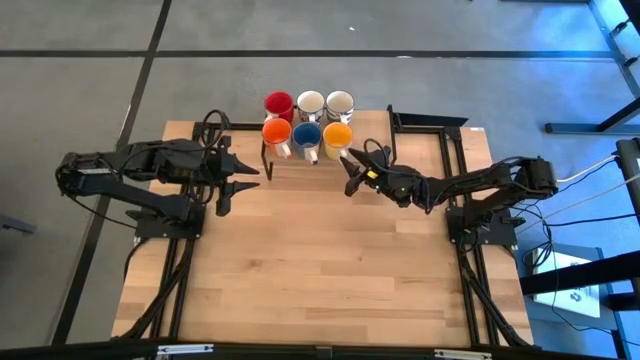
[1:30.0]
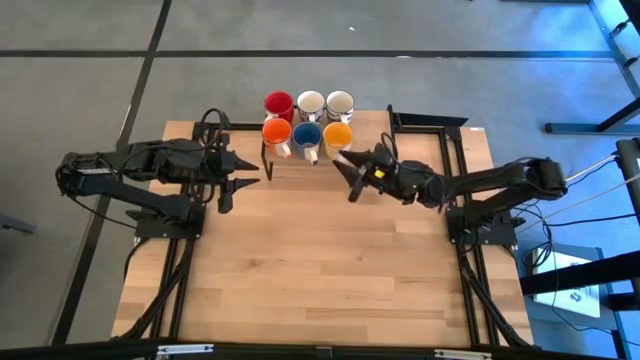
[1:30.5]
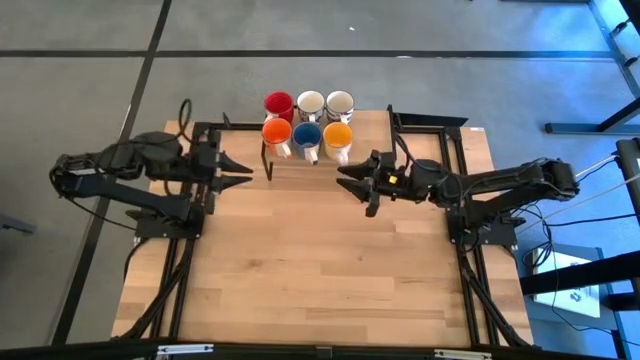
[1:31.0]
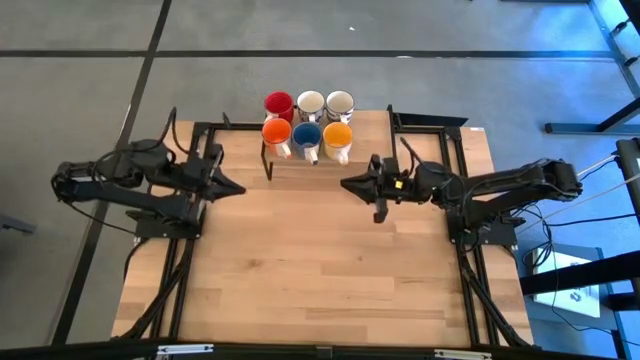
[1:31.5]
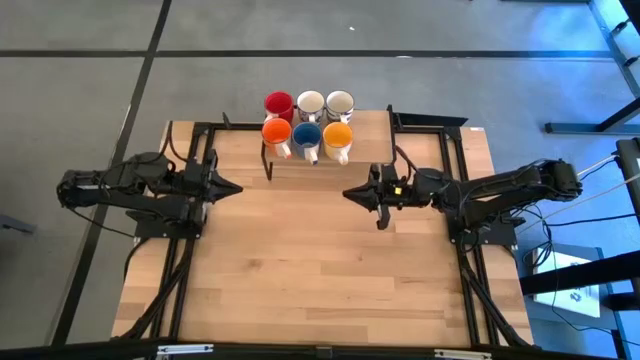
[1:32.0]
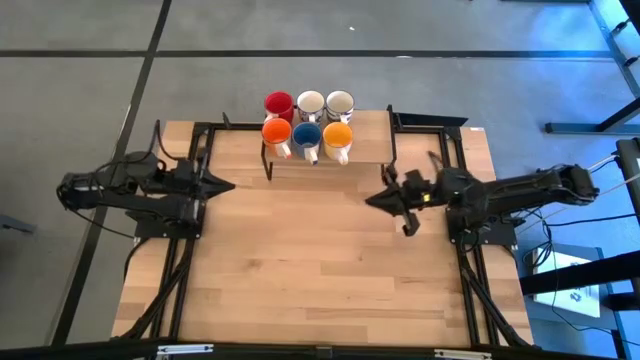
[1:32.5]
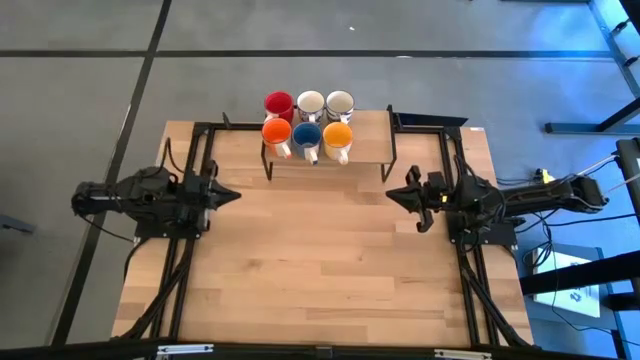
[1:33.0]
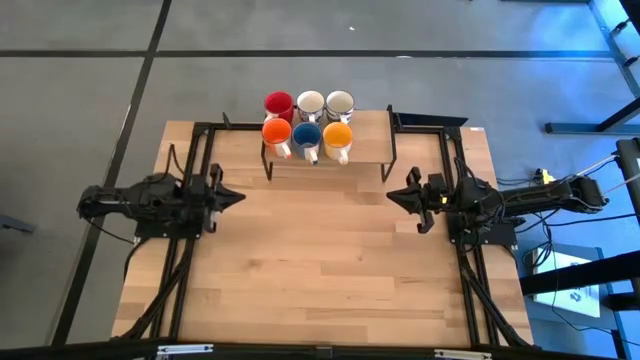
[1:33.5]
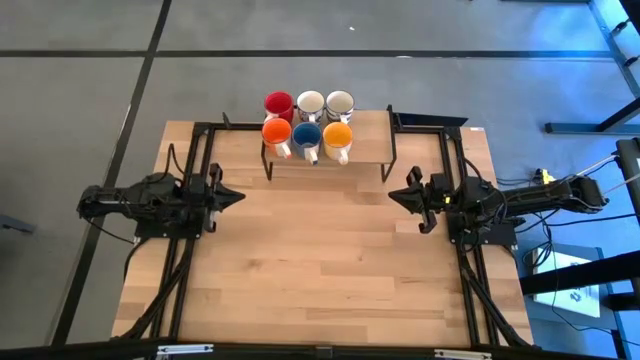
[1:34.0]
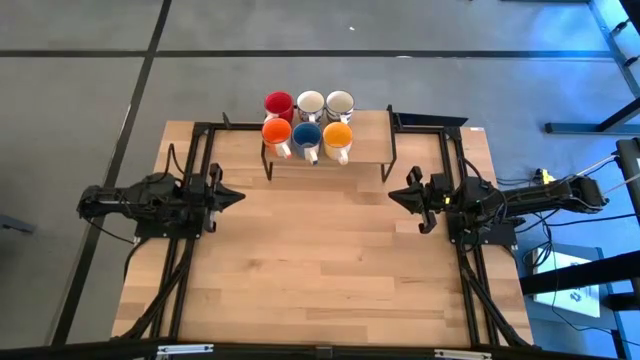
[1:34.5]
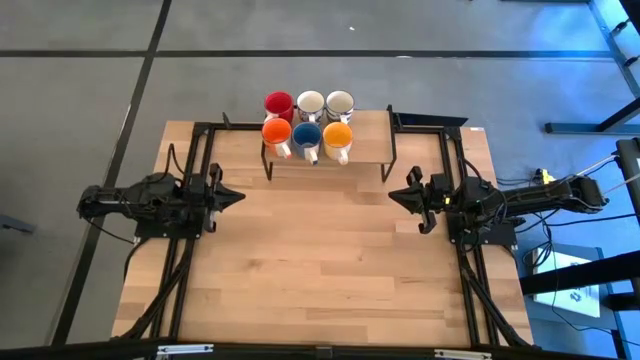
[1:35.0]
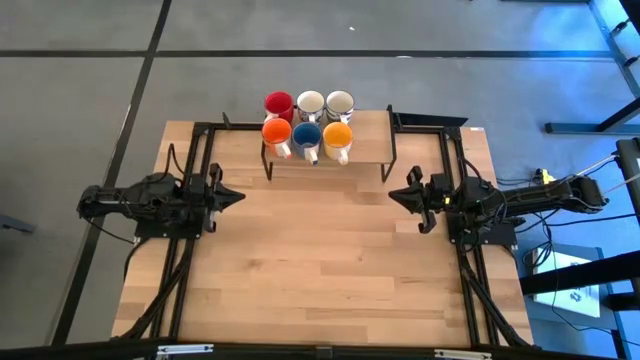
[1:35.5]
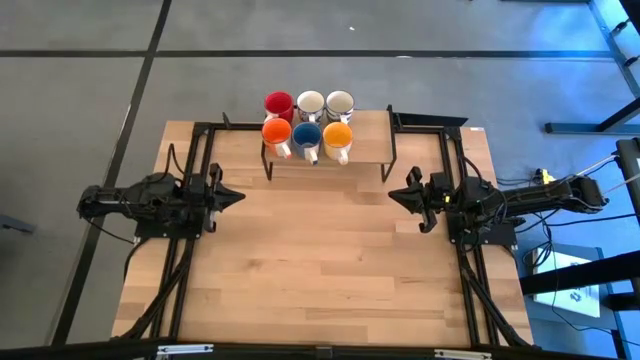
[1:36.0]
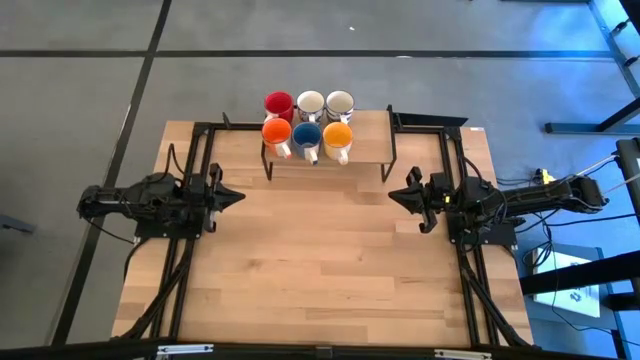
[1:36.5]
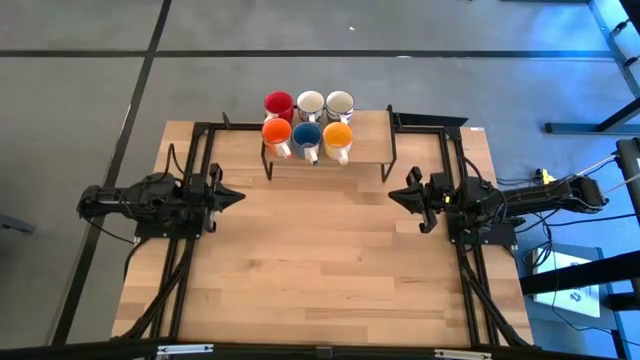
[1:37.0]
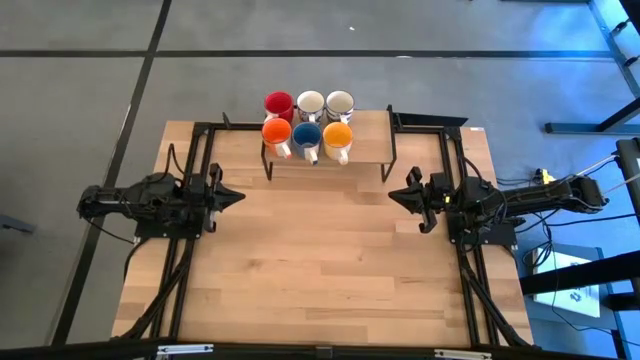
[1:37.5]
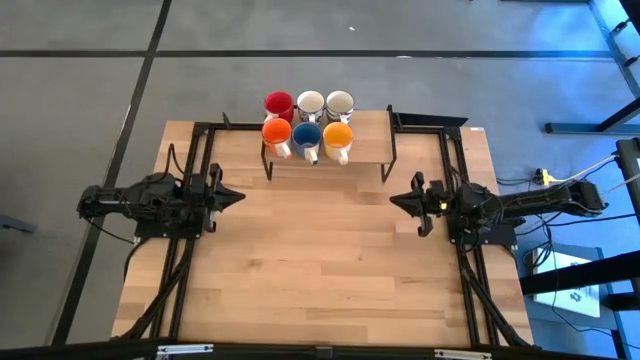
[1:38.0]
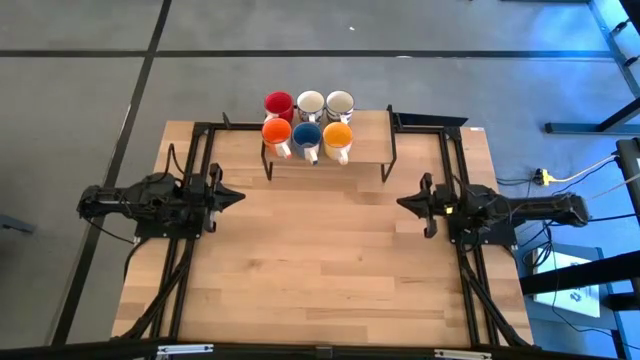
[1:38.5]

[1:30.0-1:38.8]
Task: Place coffee mugs
Return to Home Position

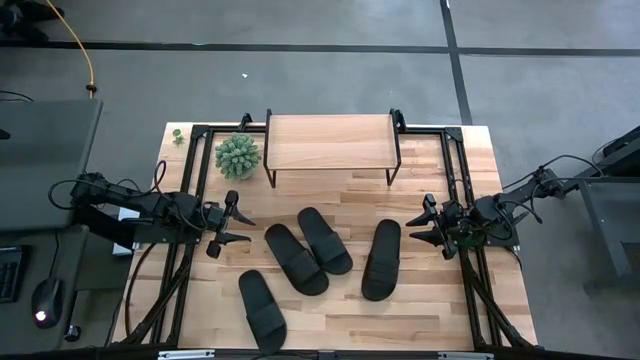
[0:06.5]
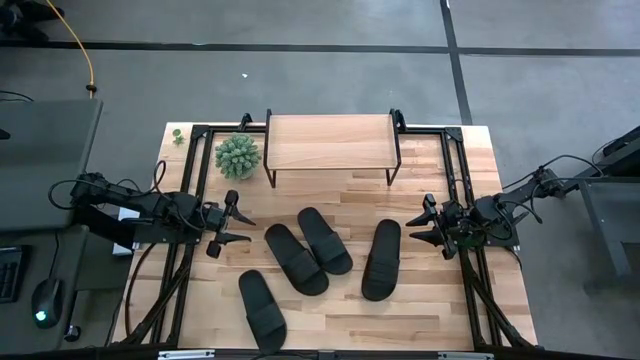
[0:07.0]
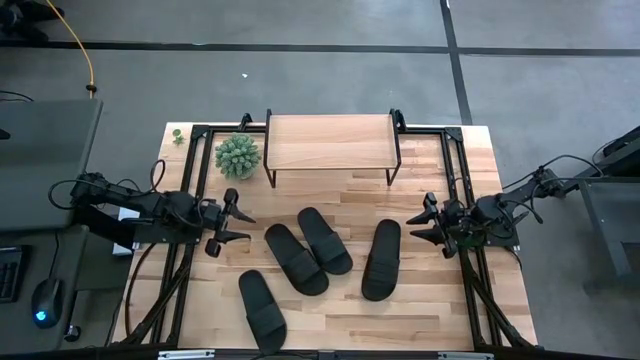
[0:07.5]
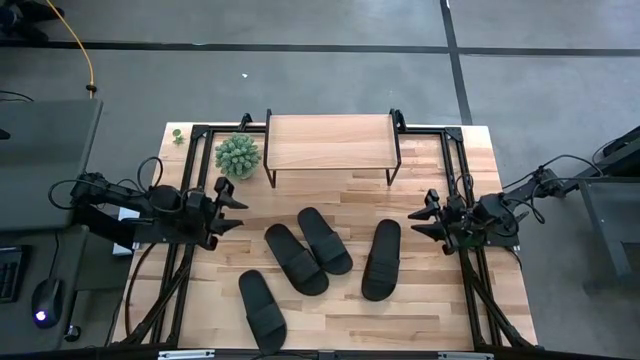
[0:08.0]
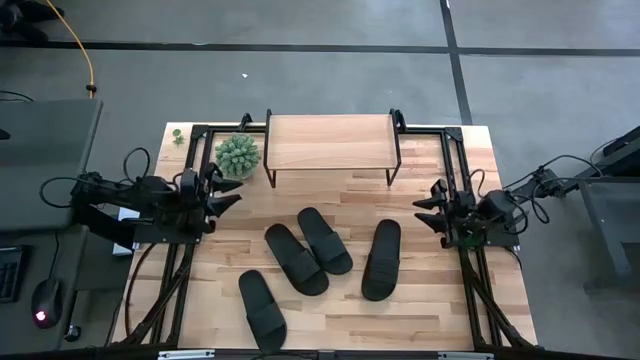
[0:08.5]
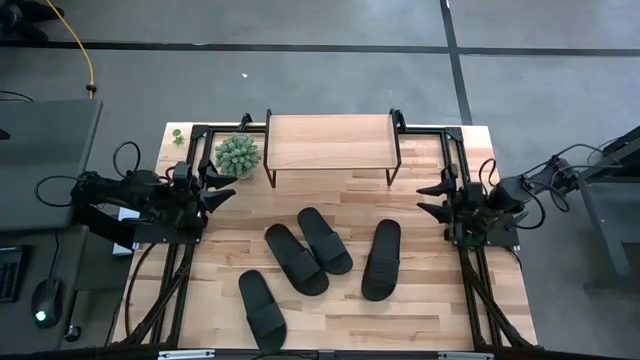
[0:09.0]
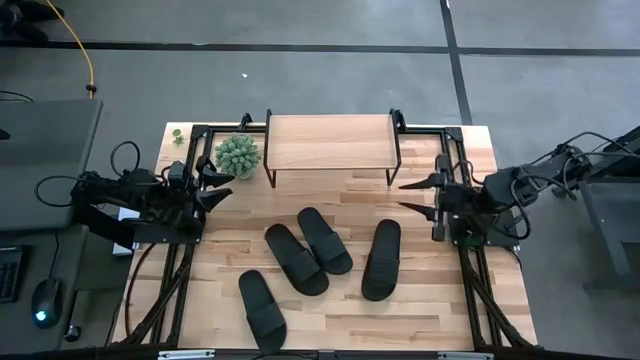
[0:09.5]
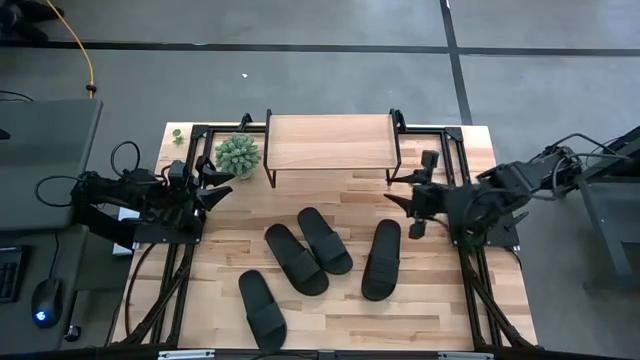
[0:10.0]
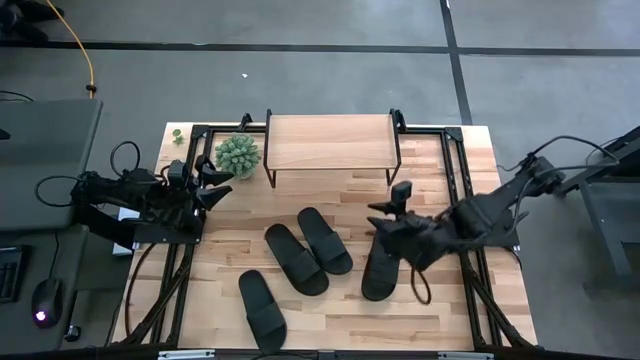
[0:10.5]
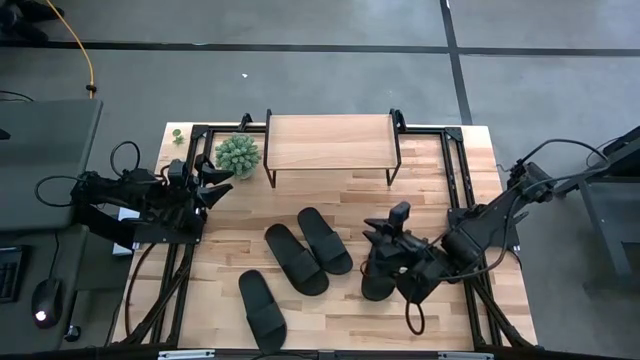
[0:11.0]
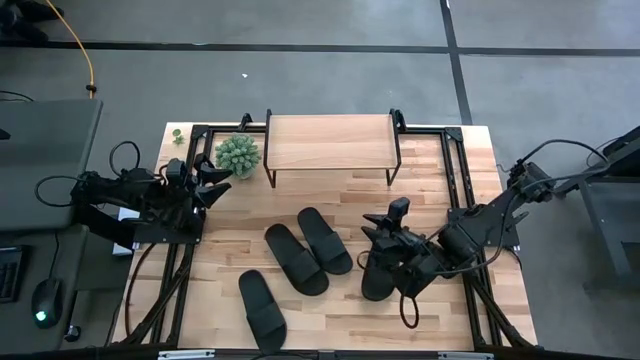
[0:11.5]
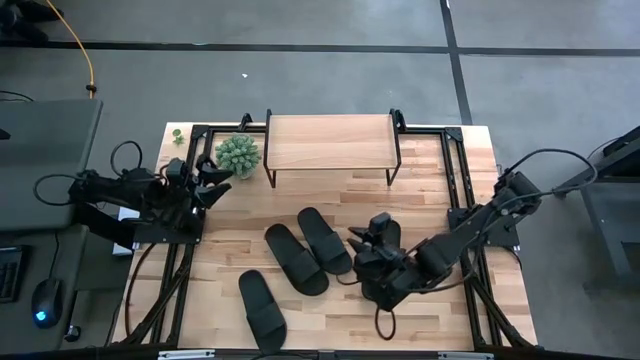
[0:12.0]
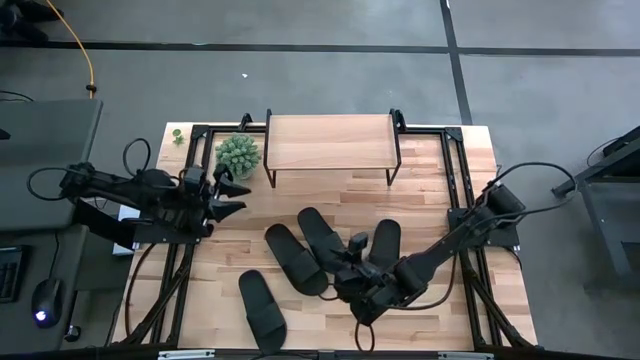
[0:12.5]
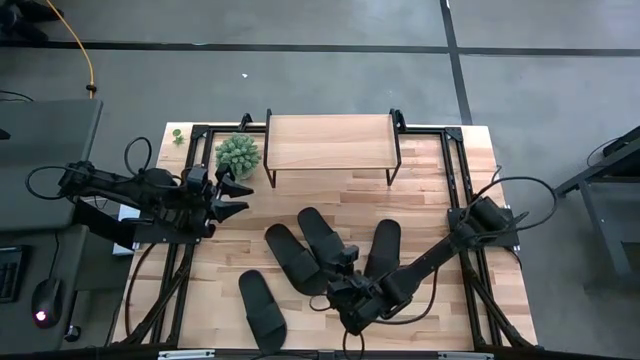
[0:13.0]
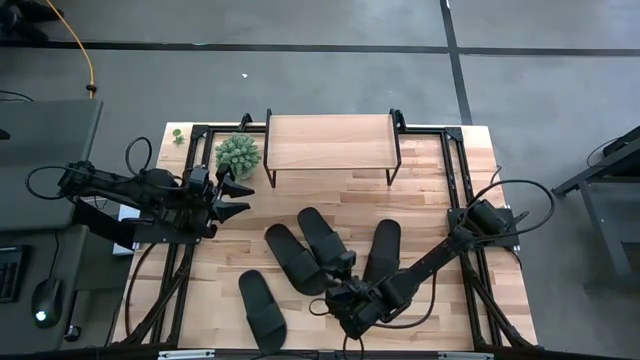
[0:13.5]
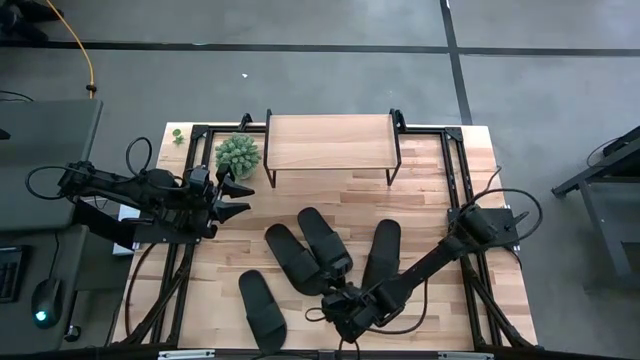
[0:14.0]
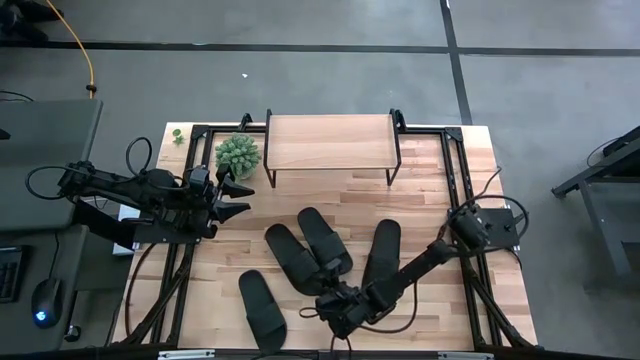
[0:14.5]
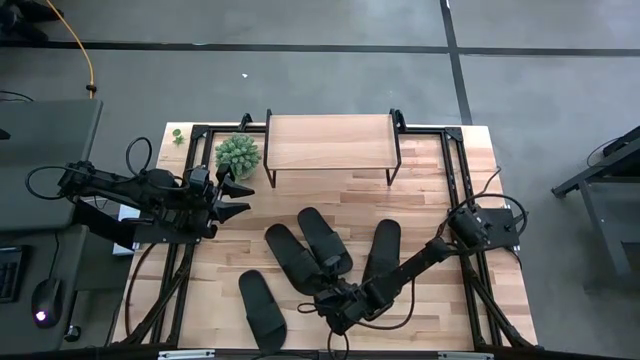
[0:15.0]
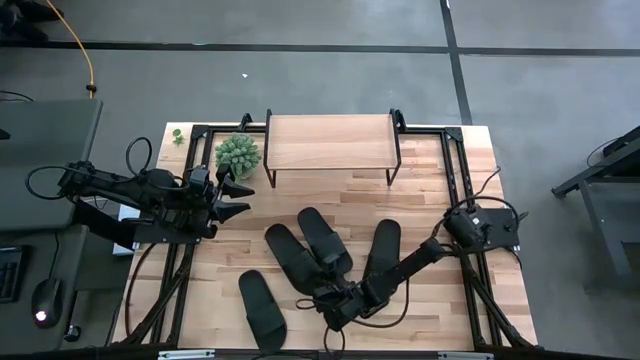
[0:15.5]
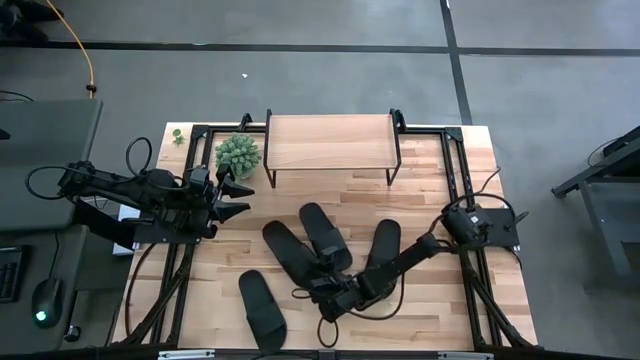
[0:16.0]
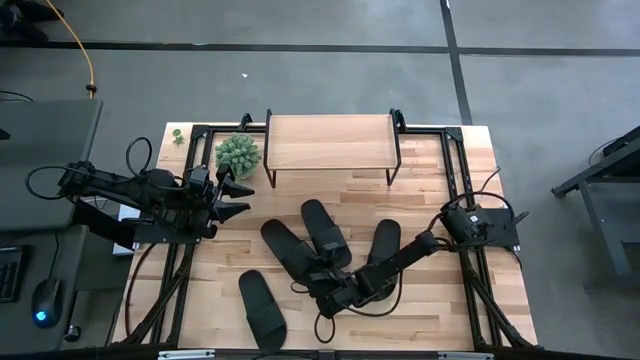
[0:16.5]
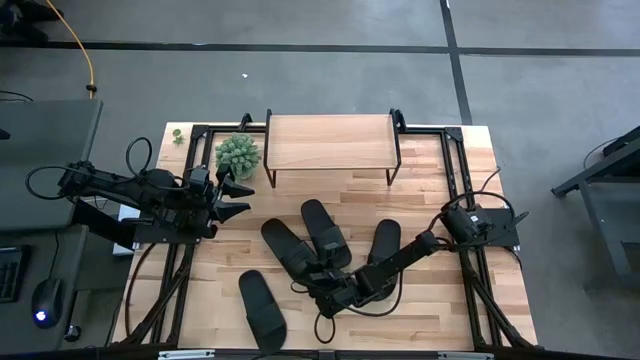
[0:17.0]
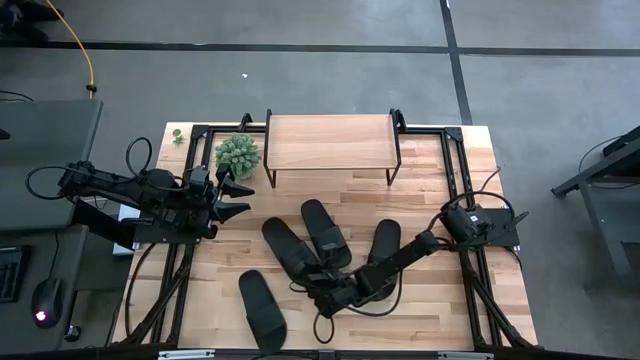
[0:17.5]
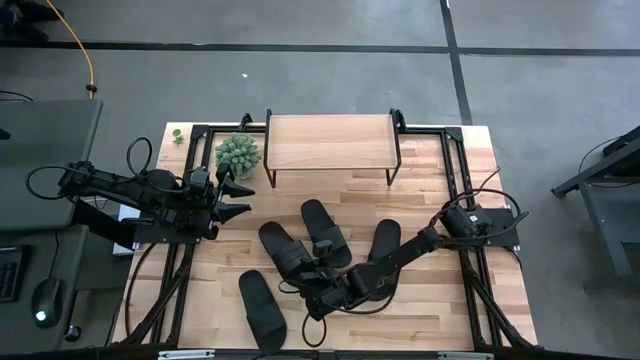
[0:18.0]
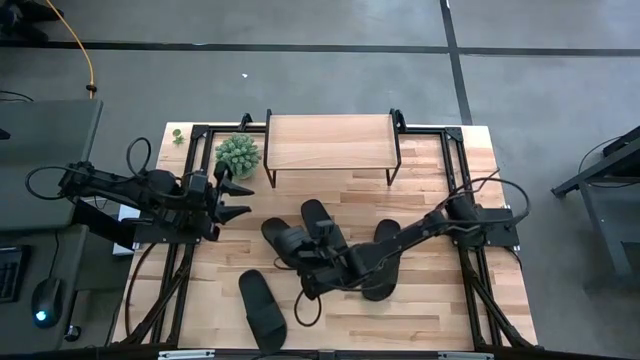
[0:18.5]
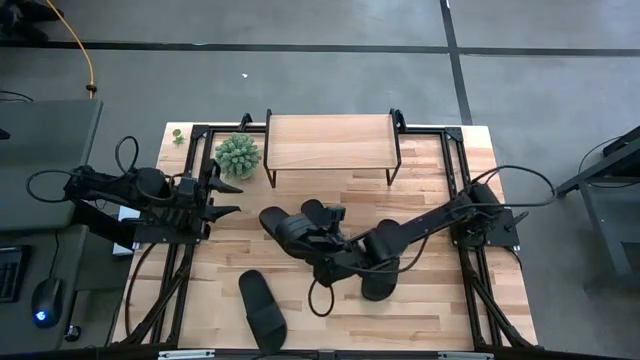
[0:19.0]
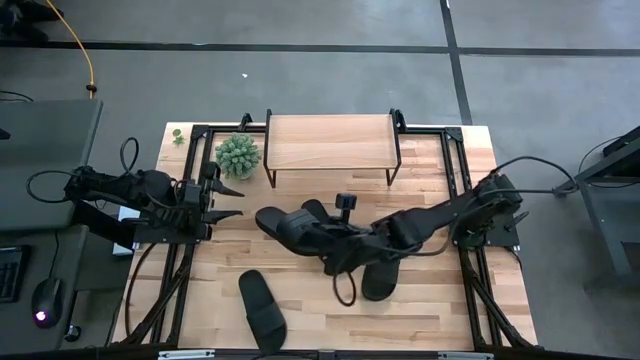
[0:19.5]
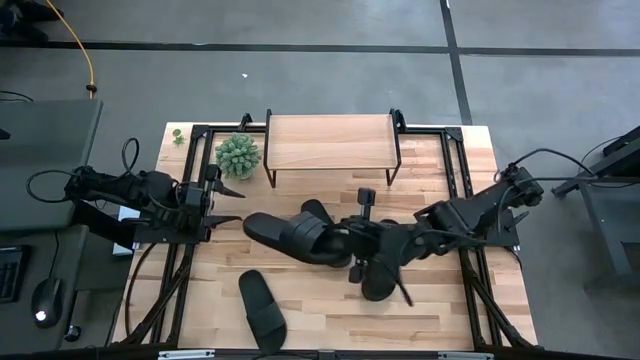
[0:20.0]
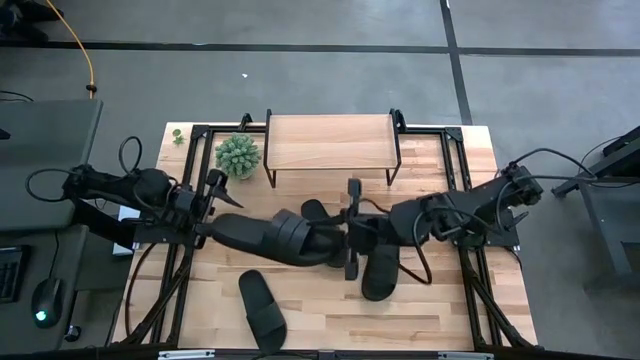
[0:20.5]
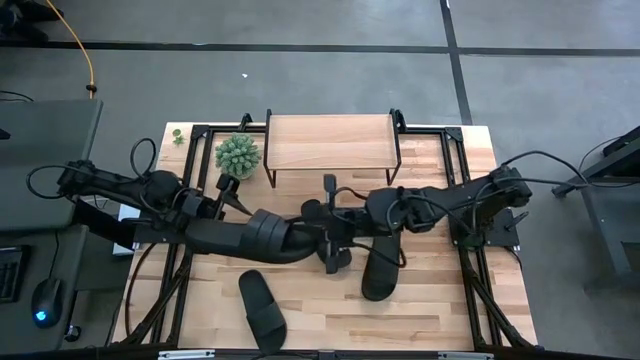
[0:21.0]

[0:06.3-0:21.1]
Task: Pick and place slides into the shelf
Put the black slide on the shelf
